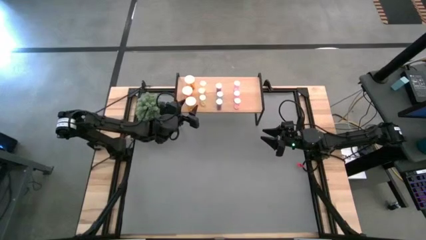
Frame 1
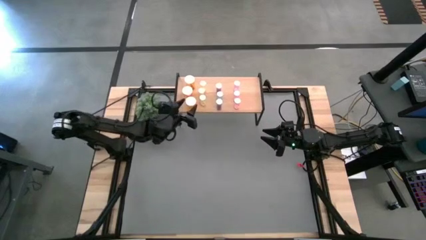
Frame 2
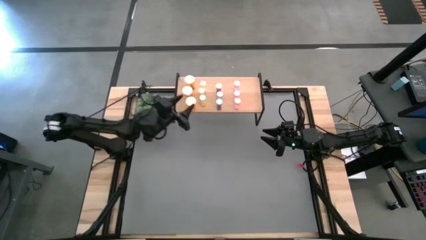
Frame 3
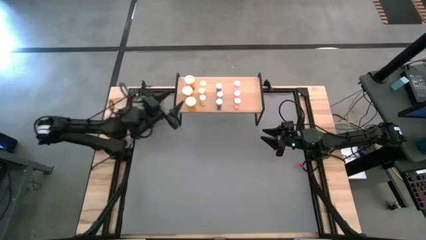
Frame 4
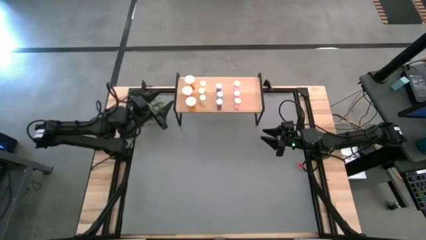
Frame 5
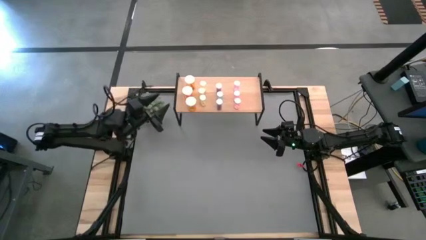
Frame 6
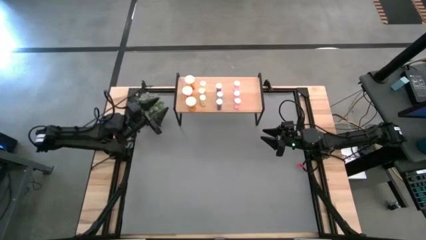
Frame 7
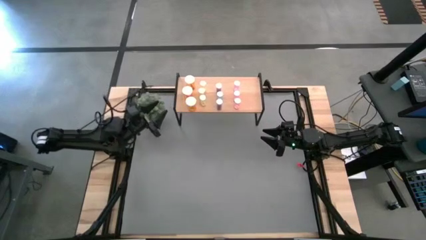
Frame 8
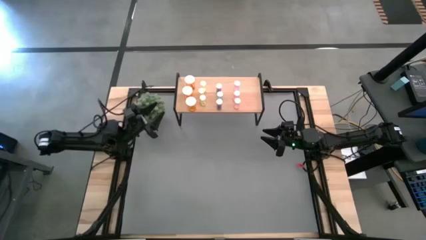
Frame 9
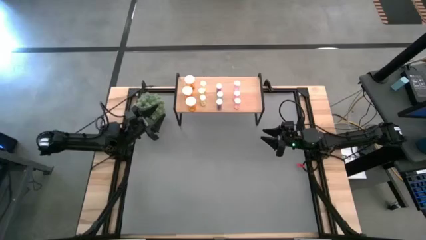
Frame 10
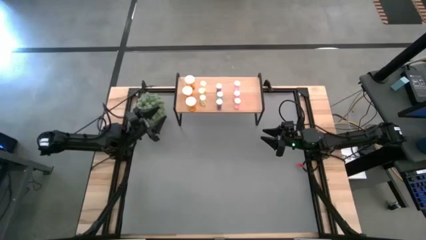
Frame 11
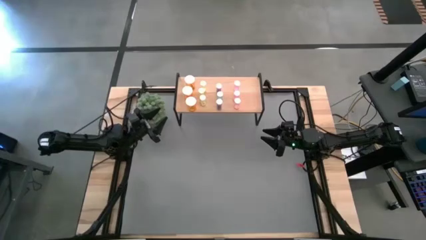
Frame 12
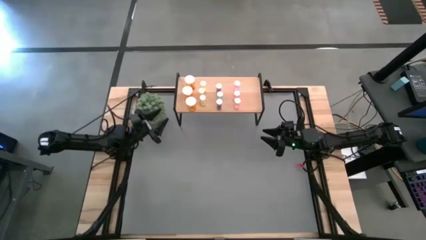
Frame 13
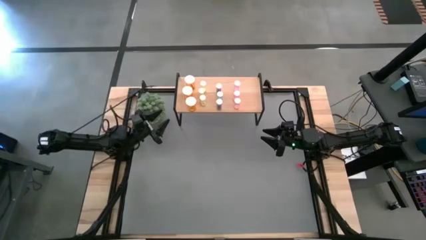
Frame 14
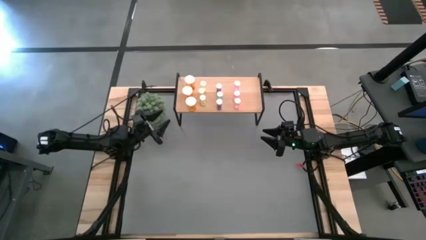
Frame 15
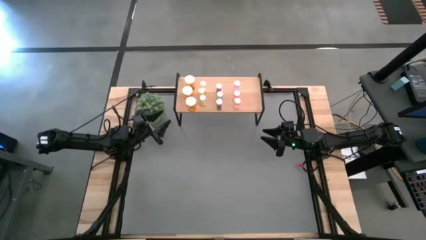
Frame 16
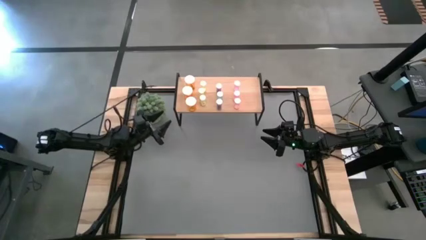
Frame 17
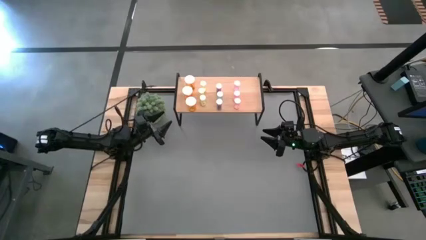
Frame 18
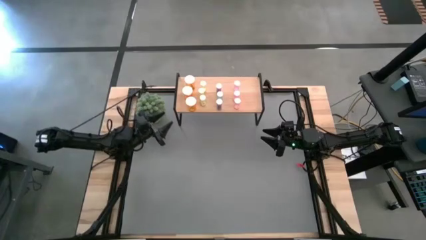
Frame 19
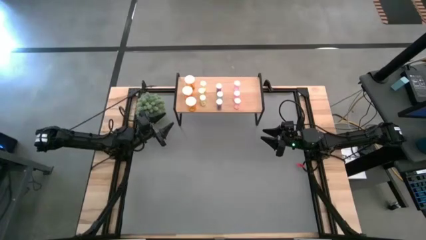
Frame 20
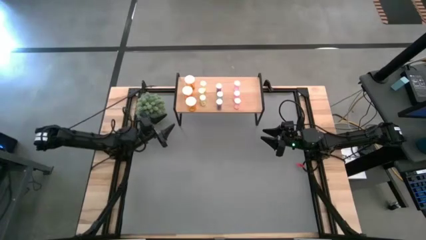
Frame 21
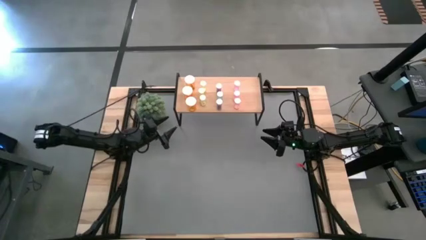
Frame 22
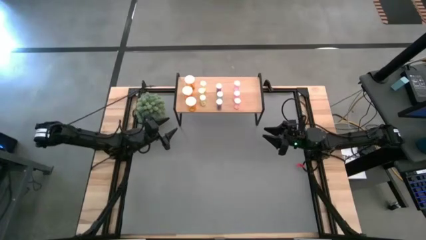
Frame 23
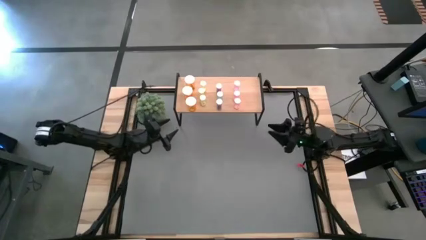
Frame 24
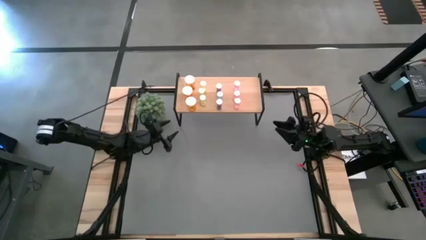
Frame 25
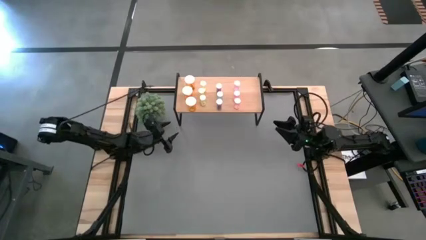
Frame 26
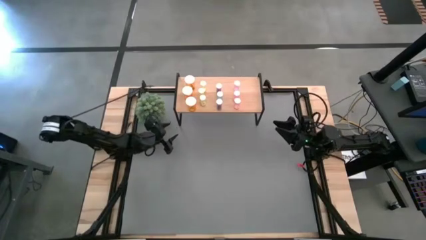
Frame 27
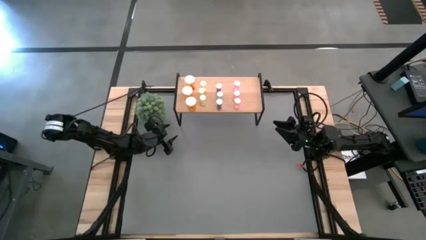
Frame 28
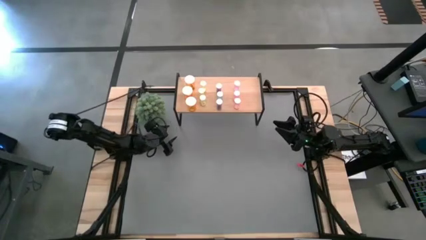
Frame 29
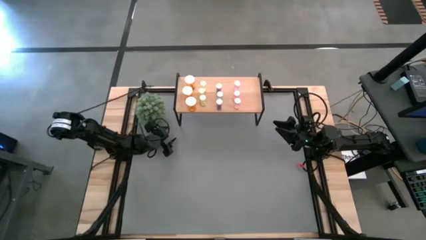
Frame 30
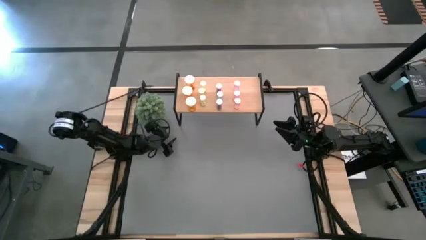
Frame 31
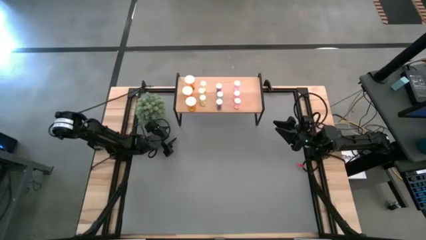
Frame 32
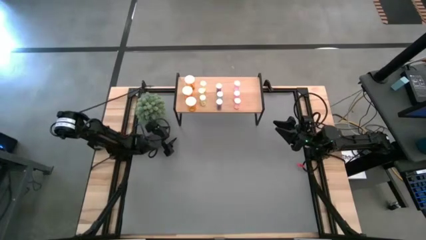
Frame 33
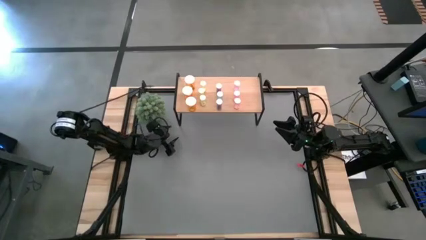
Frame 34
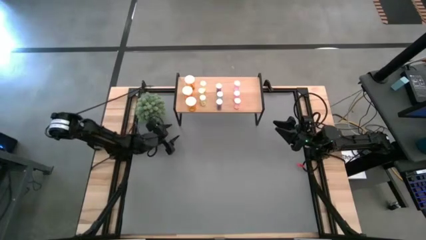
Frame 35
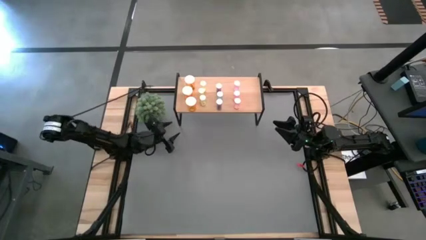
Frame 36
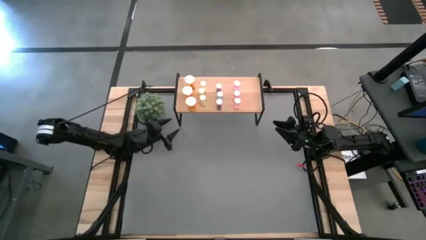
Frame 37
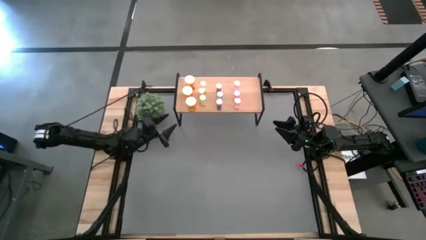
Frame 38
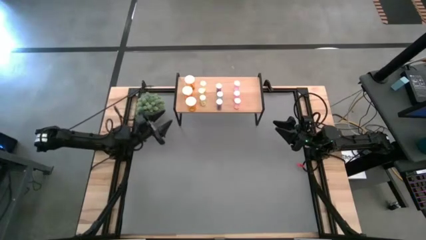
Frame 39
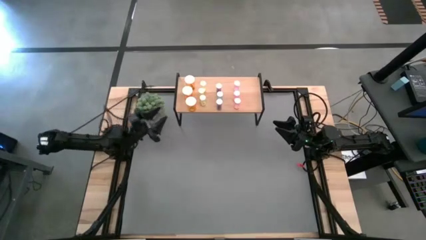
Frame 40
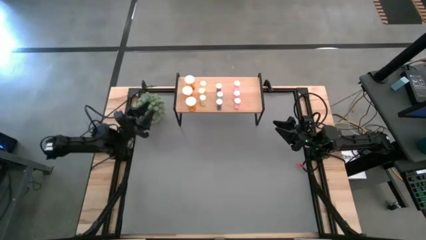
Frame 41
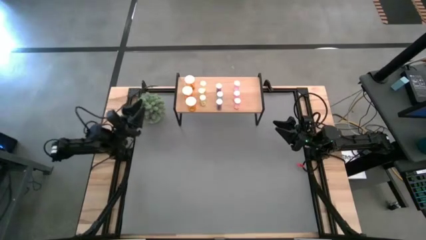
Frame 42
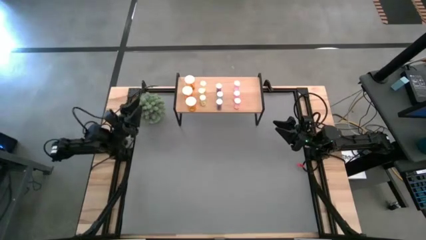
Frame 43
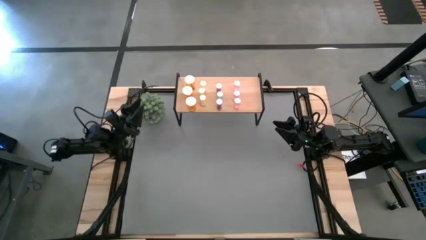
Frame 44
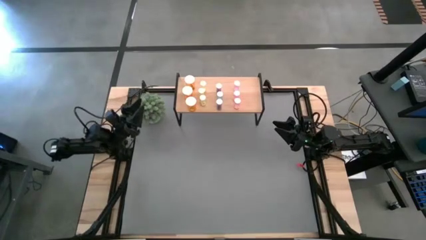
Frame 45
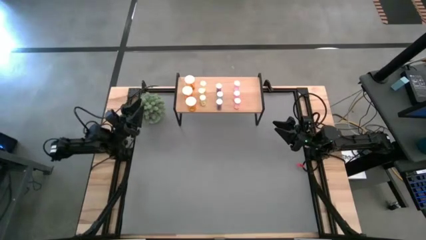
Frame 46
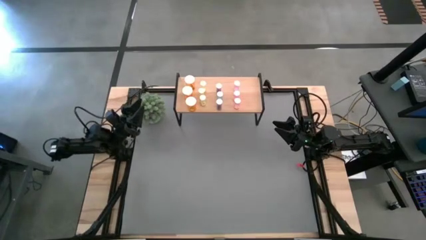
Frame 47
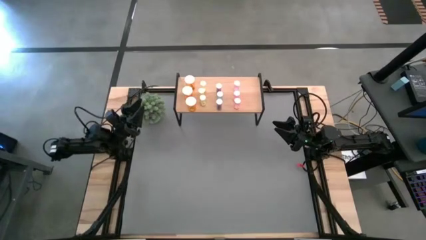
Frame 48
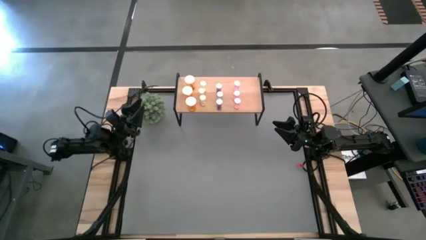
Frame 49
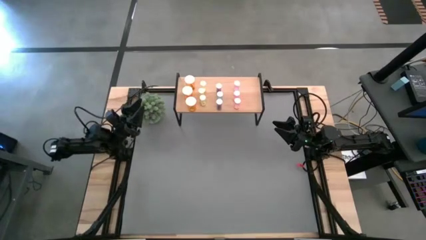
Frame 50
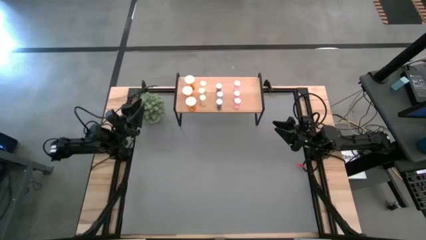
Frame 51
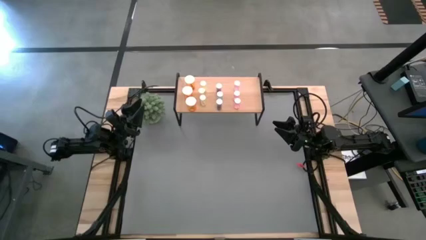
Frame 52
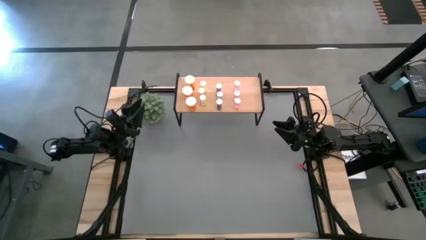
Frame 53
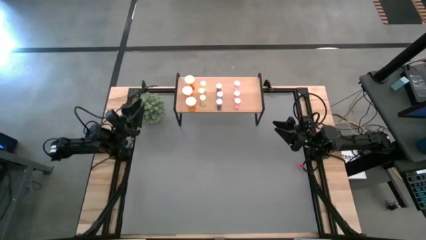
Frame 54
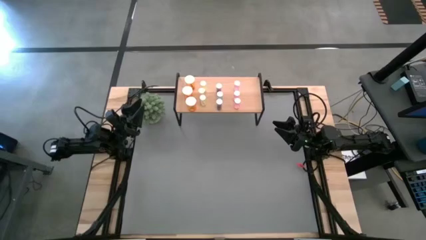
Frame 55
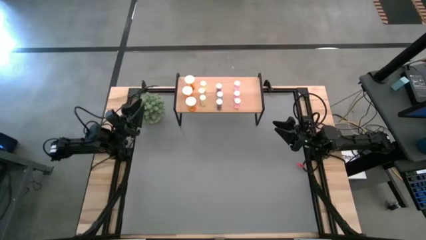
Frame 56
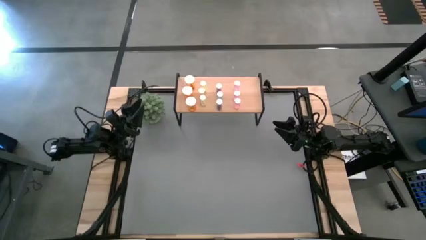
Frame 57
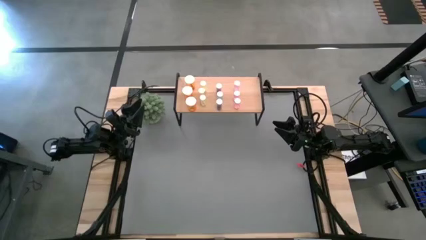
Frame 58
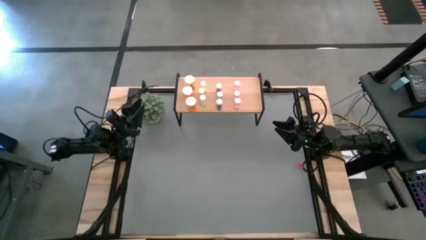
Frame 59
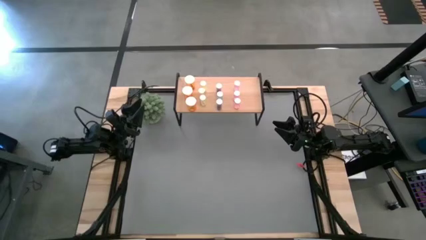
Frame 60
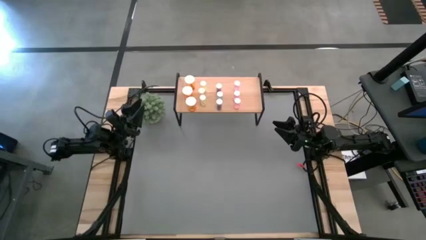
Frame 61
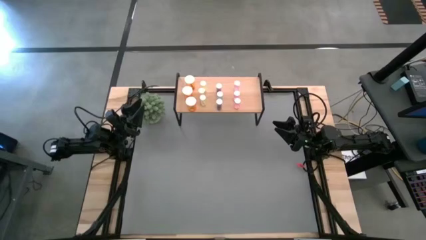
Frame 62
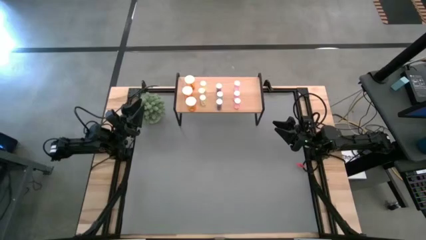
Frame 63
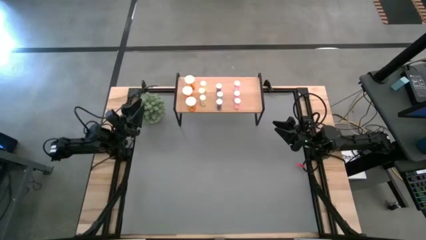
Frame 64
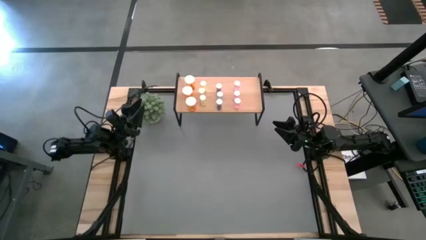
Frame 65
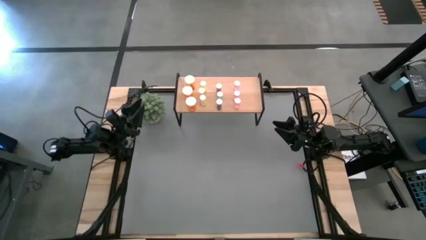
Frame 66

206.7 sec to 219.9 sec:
Task: Pick and place medicine bottles onto shelf by color
Return to Home Position

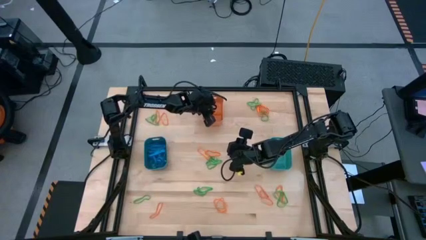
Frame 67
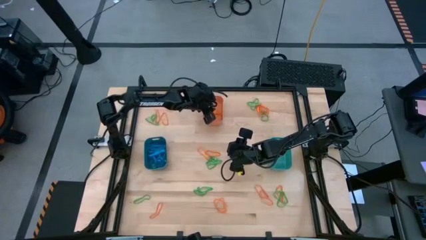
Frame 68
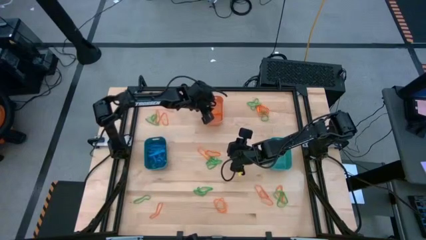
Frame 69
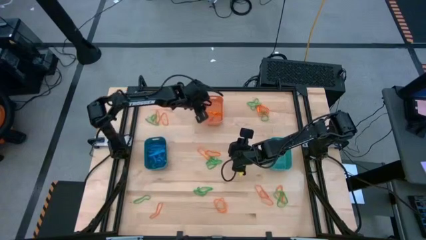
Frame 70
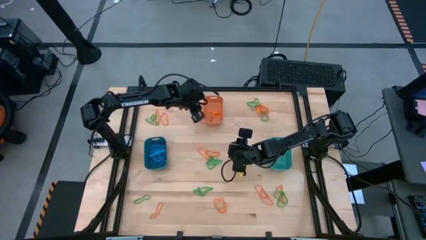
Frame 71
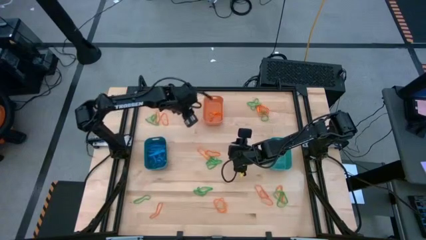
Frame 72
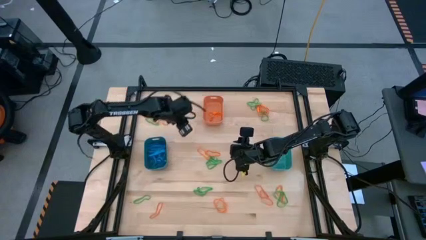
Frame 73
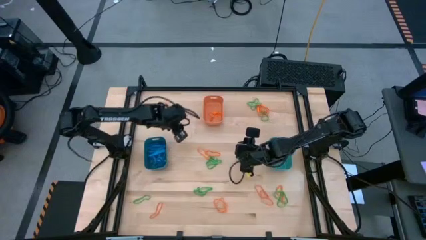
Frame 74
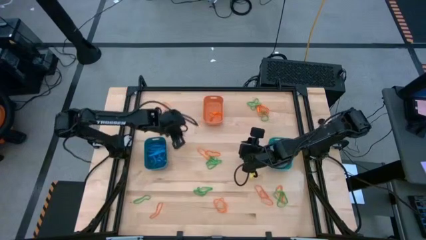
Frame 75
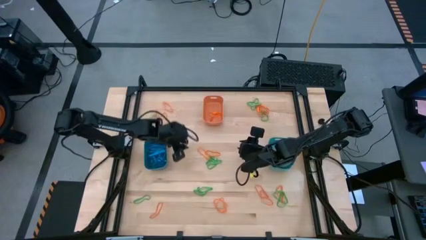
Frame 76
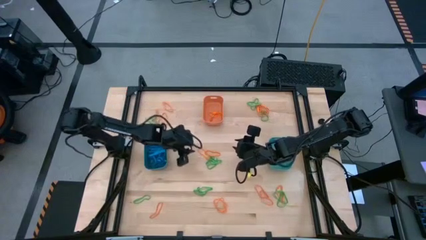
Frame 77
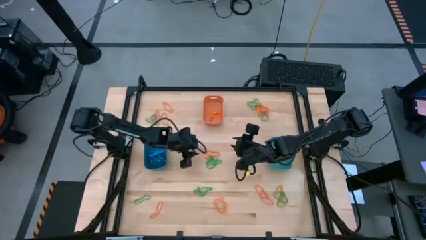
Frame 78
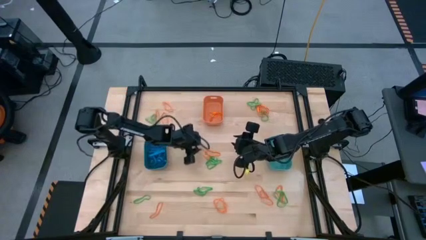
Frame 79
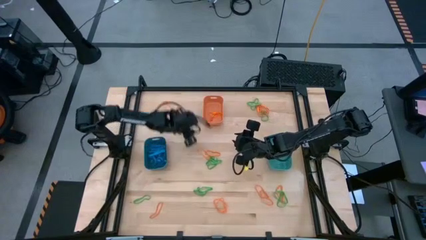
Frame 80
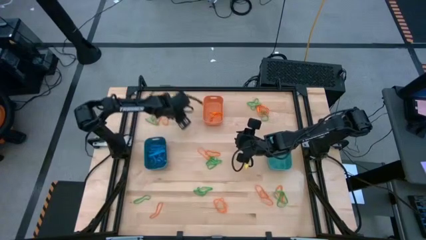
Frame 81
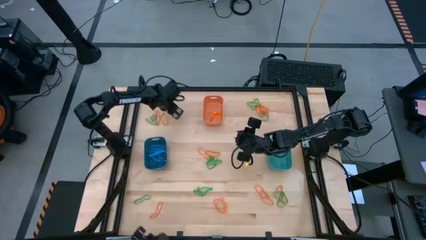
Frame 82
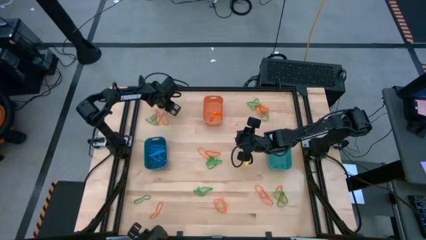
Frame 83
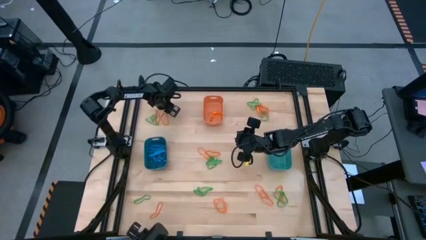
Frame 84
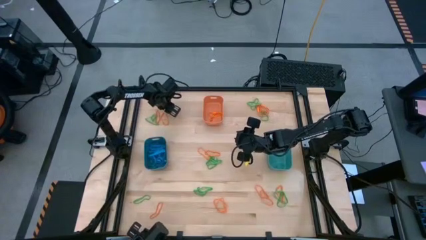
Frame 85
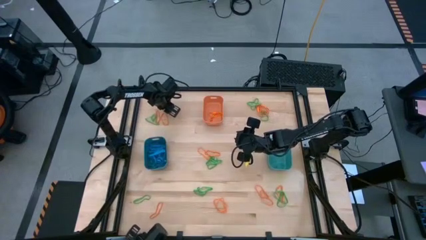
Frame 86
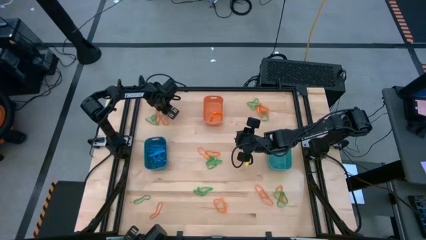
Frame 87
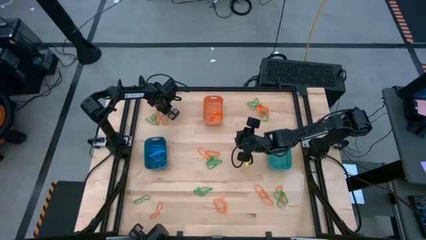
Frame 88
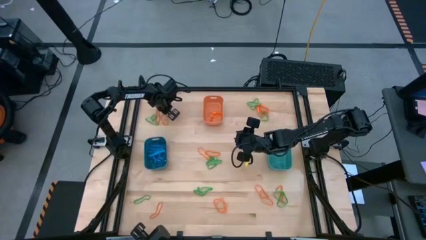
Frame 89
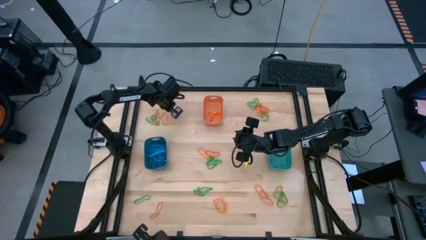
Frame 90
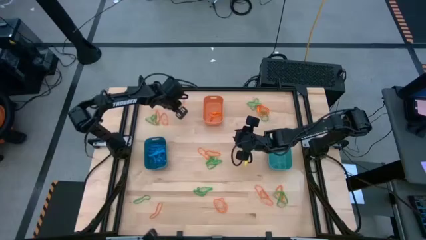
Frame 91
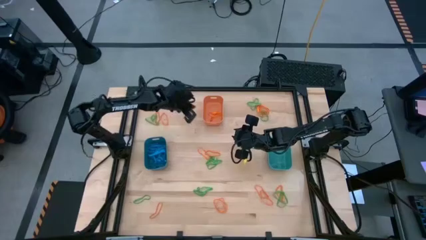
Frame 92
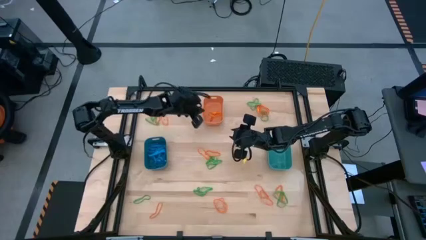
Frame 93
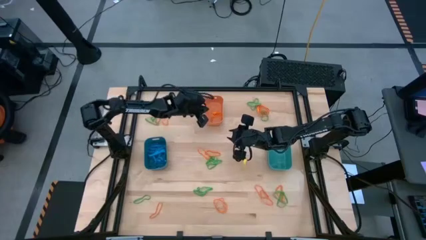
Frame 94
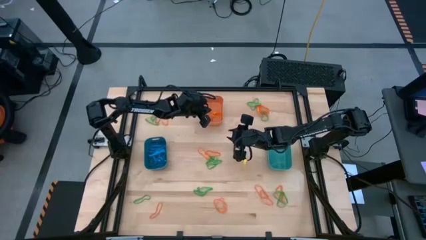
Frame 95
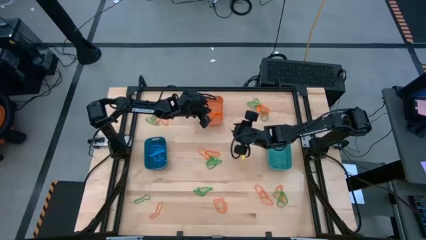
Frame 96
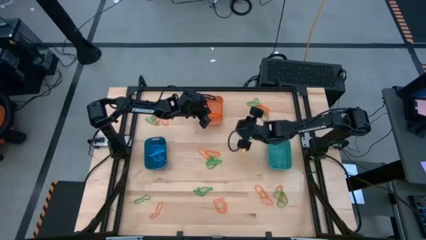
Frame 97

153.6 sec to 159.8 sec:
Task: Sort rubber bands into baskets
Put the orange rubber band into the orange bin
